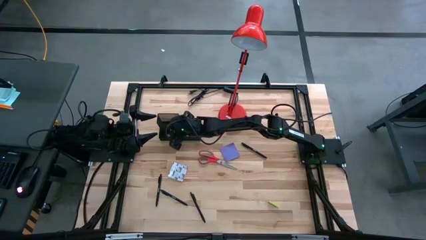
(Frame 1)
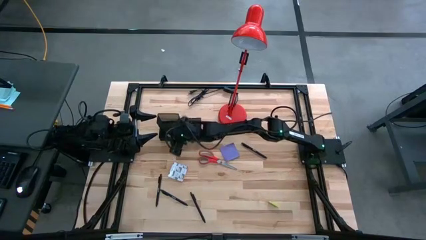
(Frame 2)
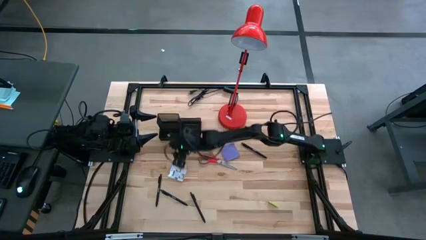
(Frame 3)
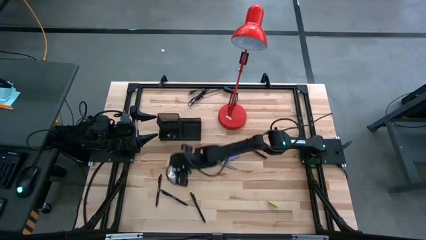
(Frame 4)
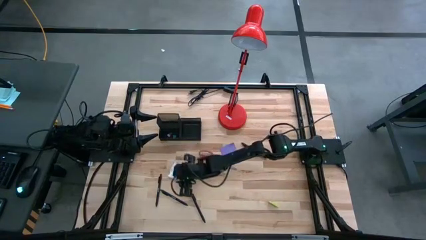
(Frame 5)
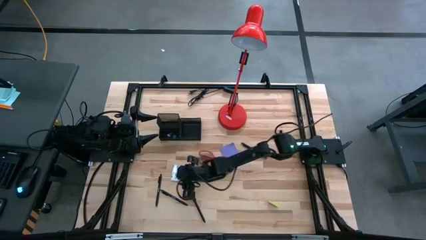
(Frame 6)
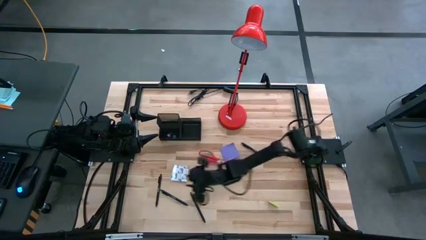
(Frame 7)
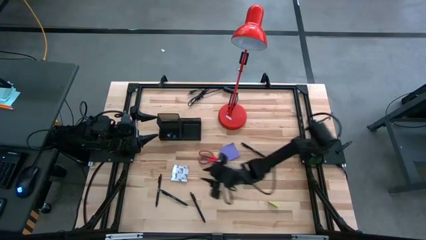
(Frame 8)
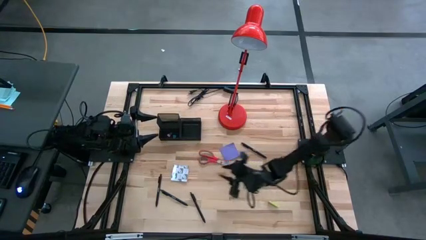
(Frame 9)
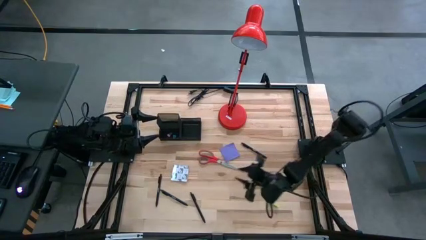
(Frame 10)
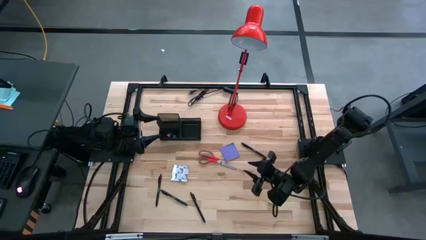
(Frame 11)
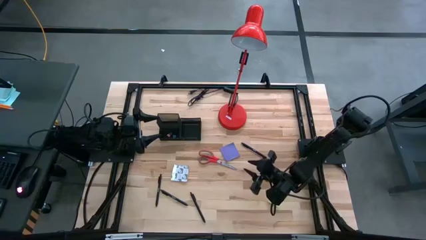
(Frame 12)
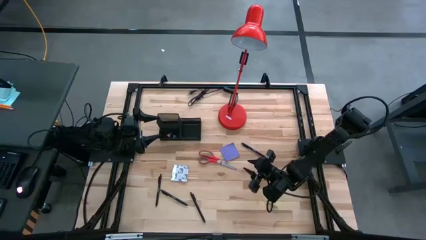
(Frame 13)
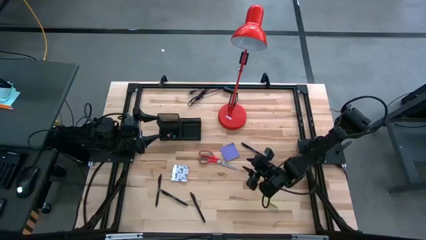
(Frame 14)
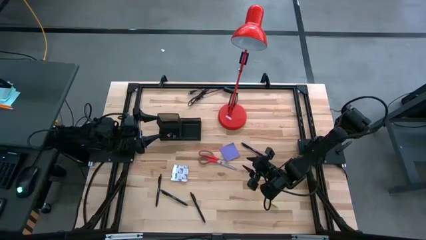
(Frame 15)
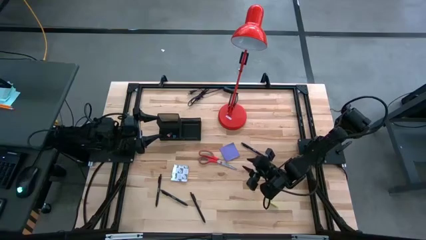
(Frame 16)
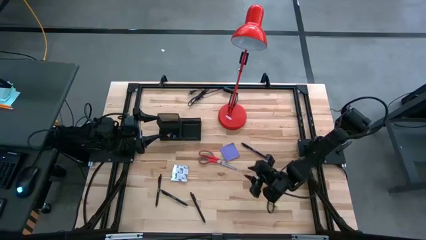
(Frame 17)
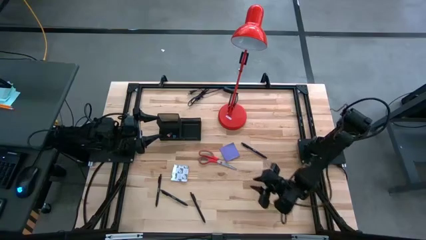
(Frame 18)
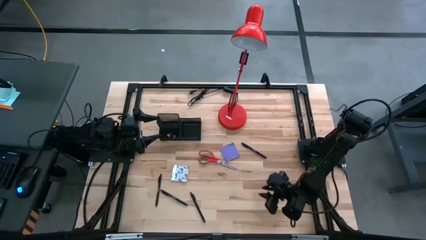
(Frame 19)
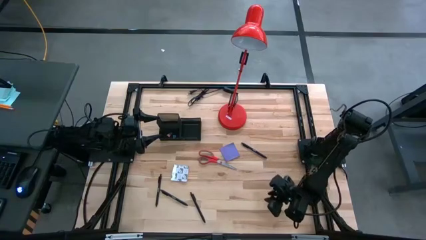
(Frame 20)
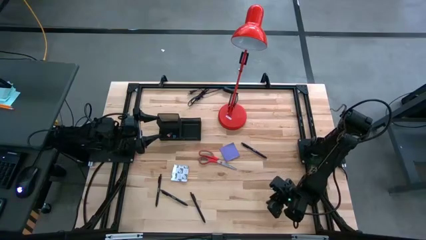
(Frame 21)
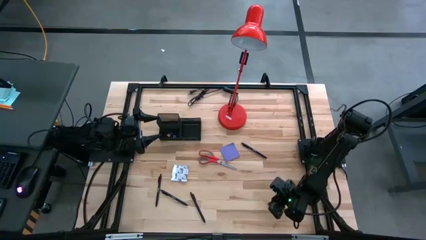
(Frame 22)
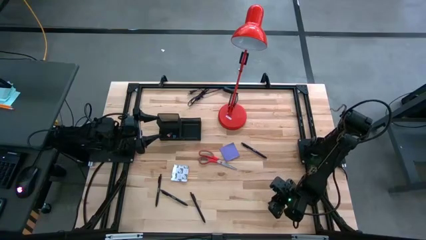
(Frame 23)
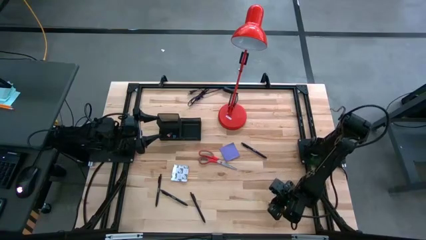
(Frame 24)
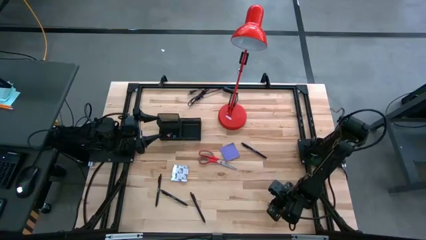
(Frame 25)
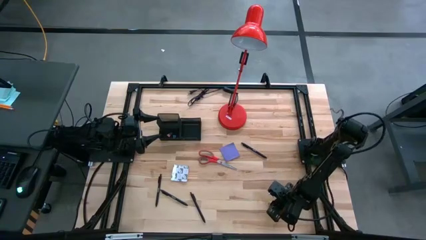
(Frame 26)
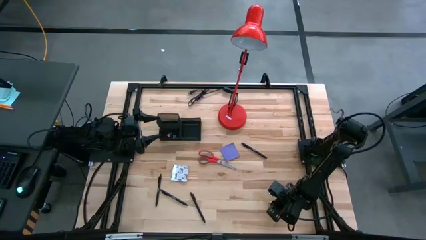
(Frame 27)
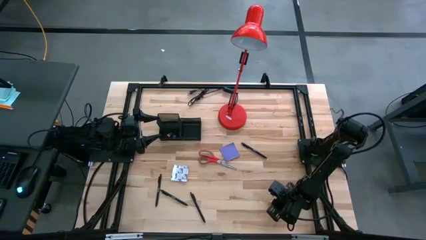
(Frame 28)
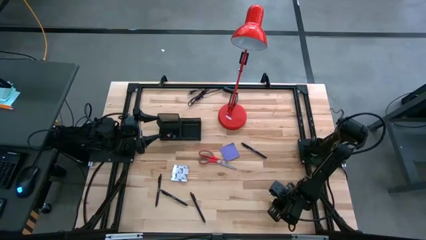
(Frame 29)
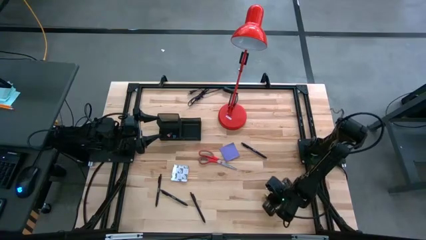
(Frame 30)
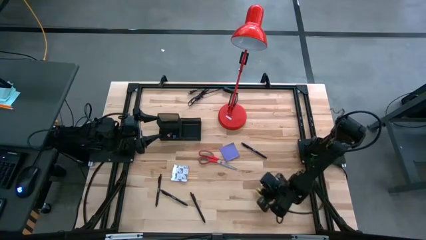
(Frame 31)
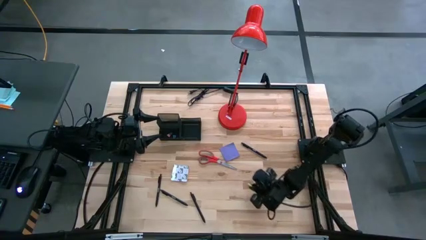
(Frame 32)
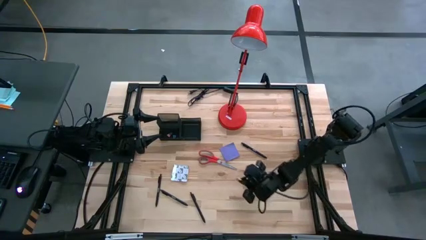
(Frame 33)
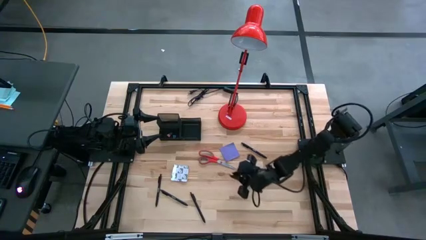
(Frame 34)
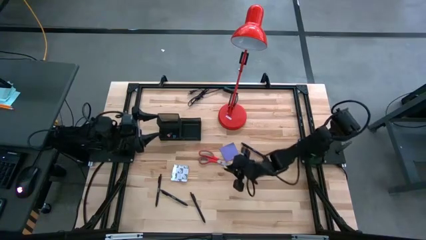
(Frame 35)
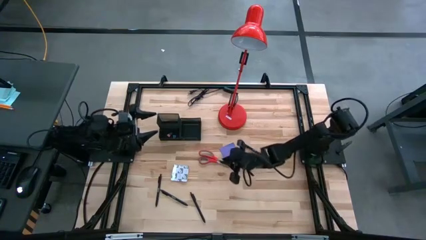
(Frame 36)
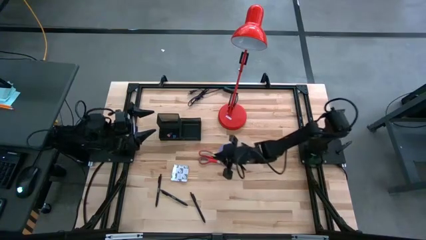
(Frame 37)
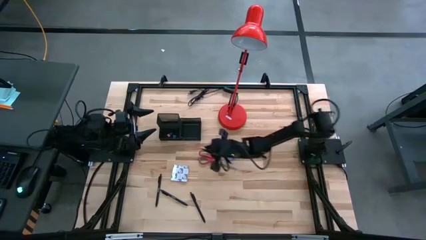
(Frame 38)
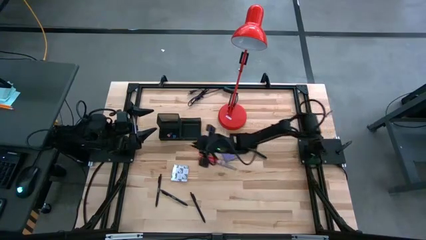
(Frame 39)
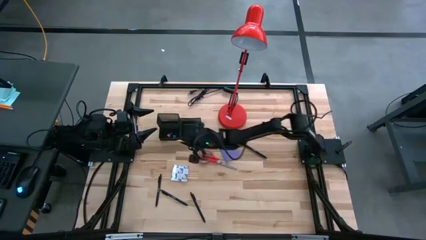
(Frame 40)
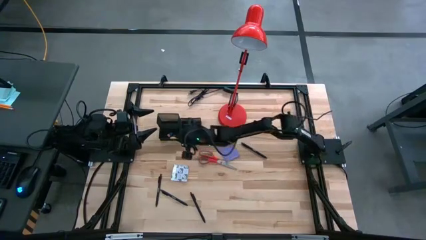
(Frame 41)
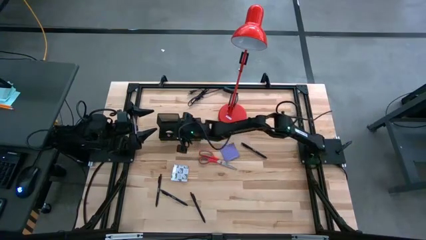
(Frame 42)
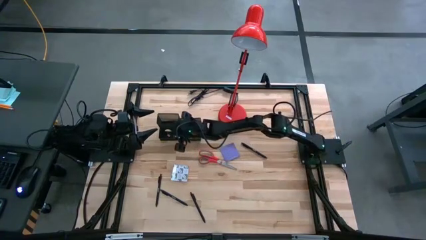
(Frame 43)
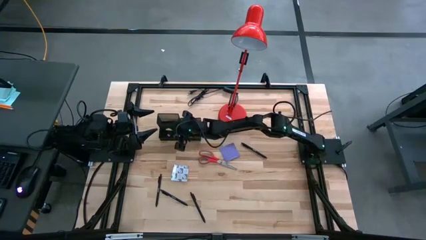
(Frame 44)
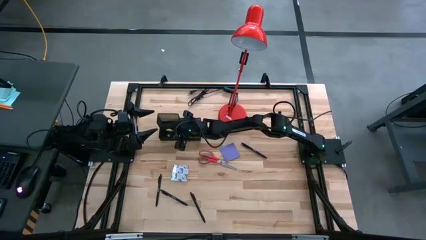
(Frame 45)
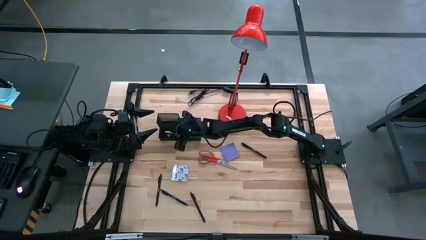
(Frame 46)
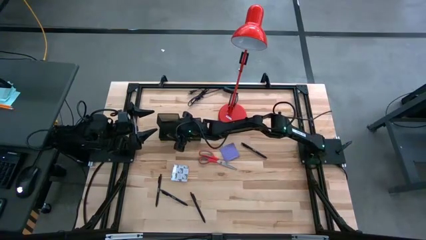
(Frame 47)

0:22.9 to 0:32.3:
Task: Pick and place office supplies into organizer
Put the yellow eraser into the black desk organizer

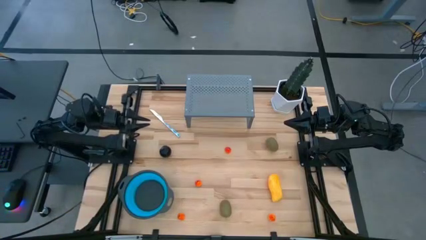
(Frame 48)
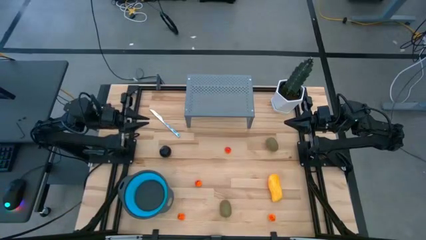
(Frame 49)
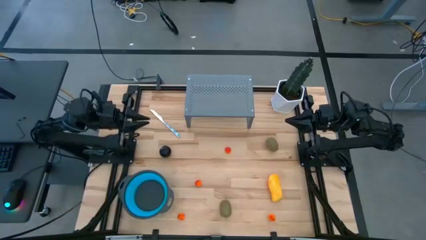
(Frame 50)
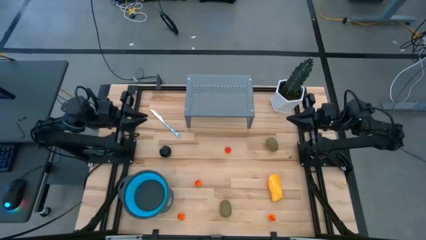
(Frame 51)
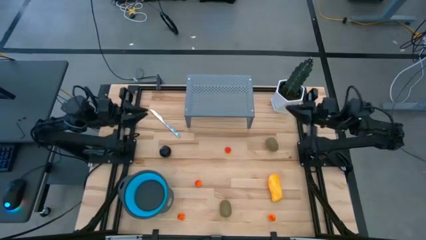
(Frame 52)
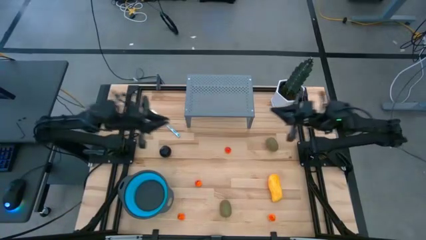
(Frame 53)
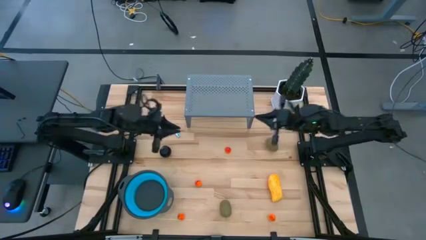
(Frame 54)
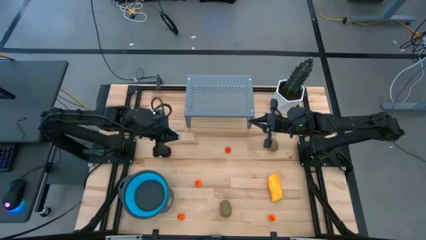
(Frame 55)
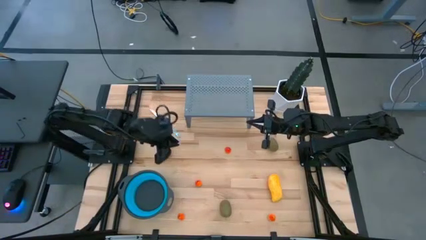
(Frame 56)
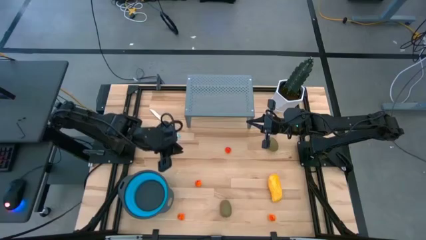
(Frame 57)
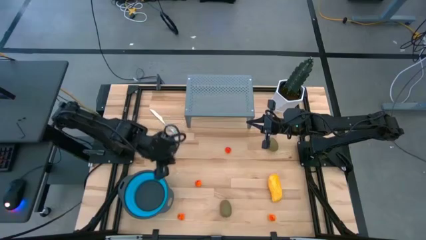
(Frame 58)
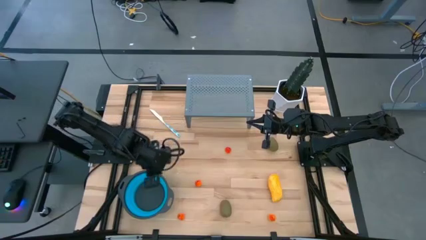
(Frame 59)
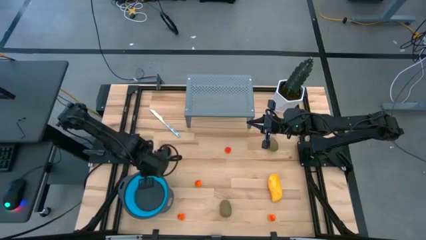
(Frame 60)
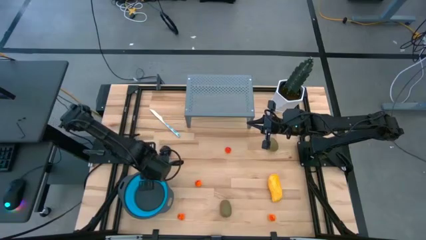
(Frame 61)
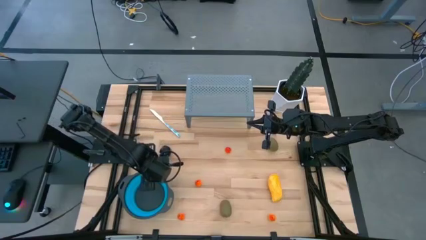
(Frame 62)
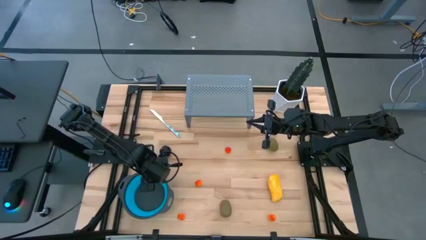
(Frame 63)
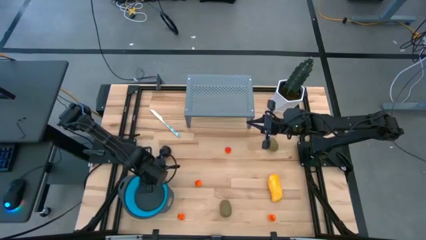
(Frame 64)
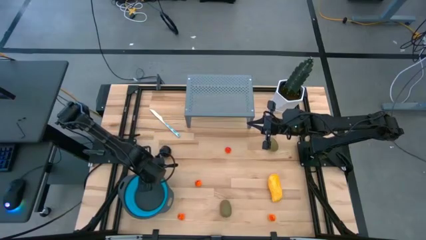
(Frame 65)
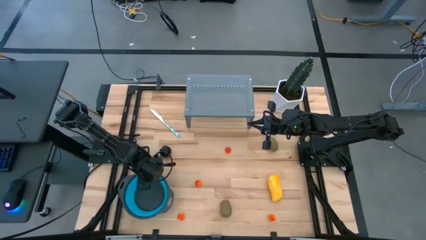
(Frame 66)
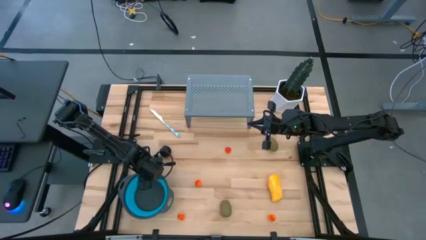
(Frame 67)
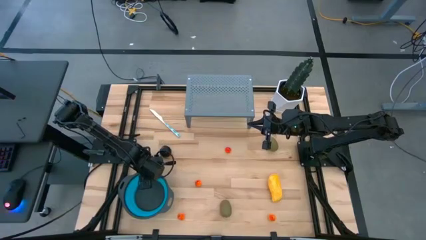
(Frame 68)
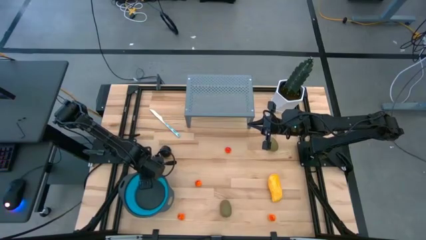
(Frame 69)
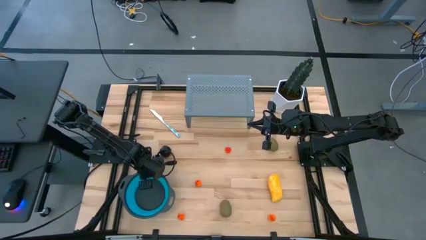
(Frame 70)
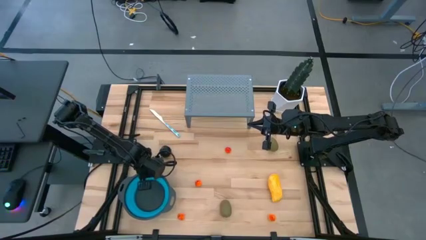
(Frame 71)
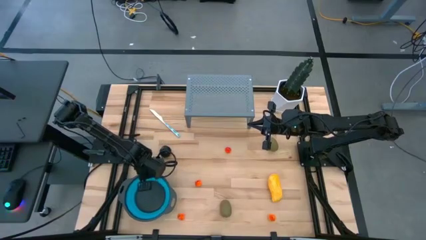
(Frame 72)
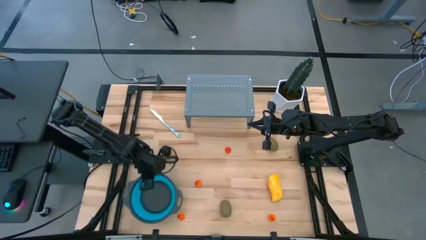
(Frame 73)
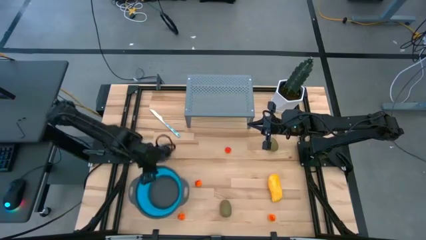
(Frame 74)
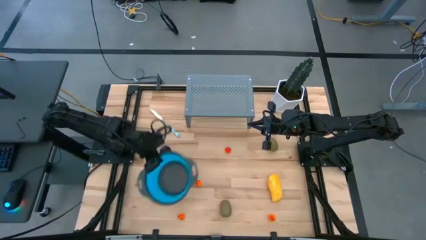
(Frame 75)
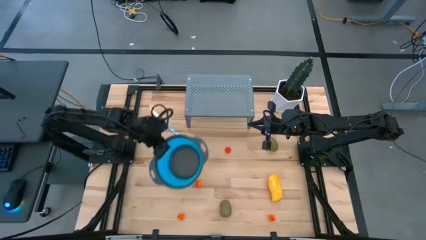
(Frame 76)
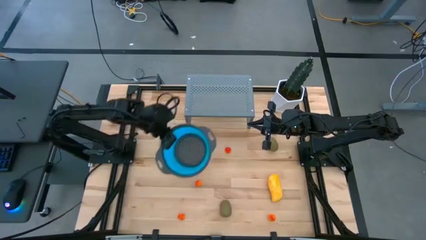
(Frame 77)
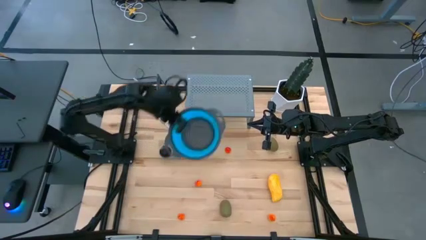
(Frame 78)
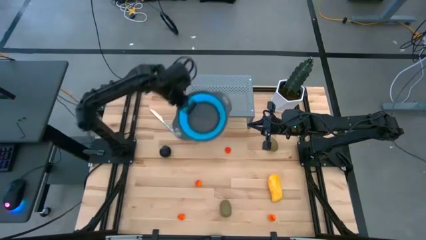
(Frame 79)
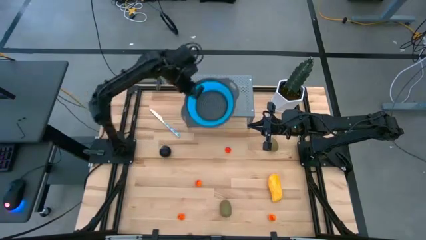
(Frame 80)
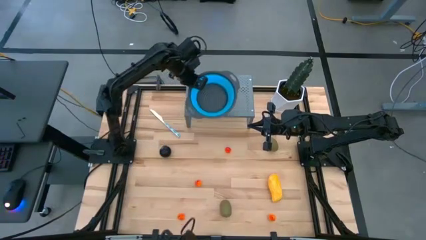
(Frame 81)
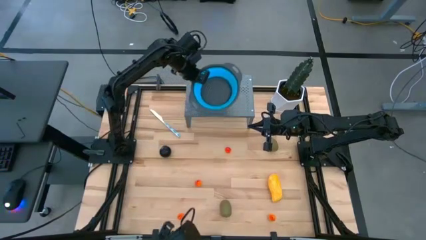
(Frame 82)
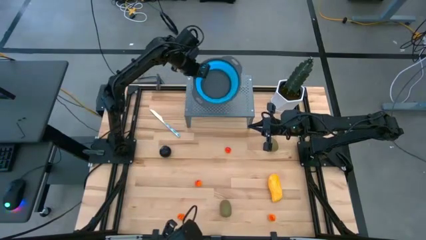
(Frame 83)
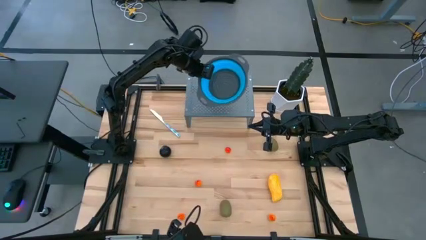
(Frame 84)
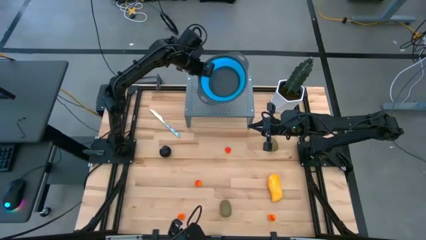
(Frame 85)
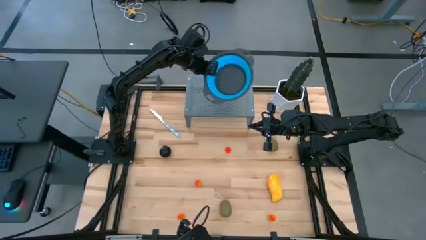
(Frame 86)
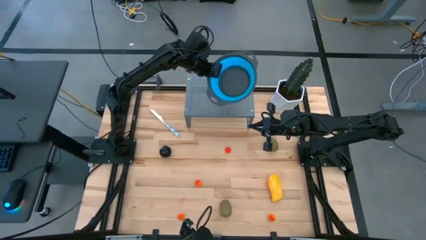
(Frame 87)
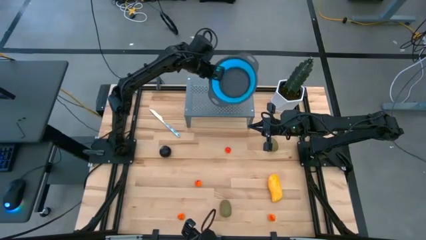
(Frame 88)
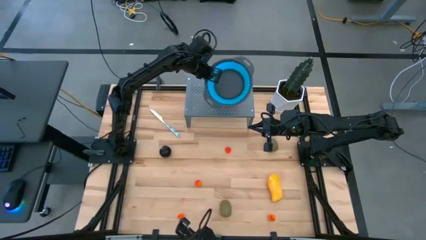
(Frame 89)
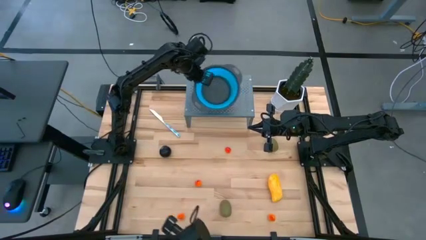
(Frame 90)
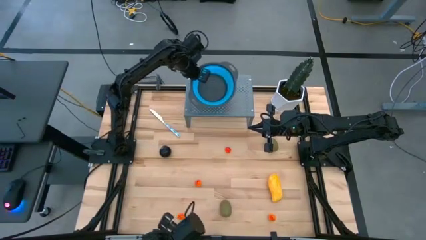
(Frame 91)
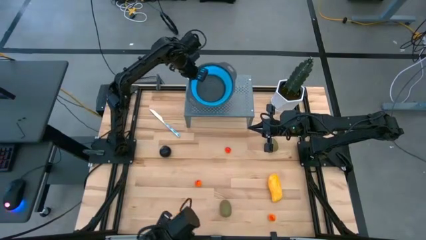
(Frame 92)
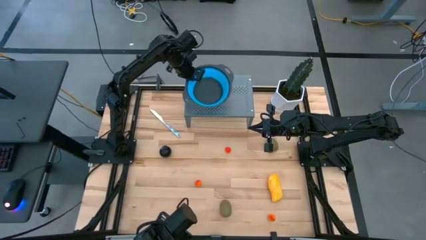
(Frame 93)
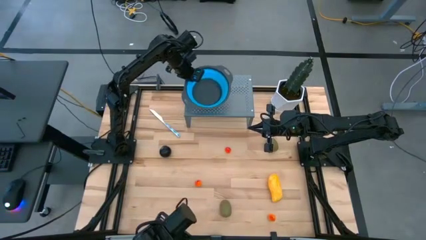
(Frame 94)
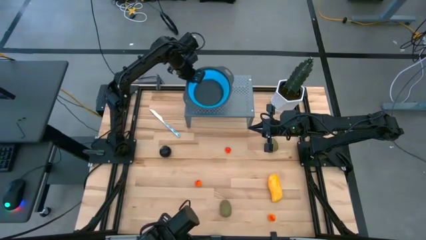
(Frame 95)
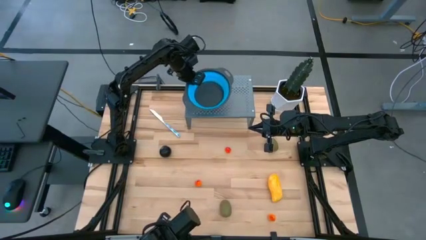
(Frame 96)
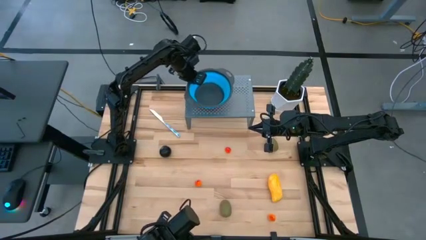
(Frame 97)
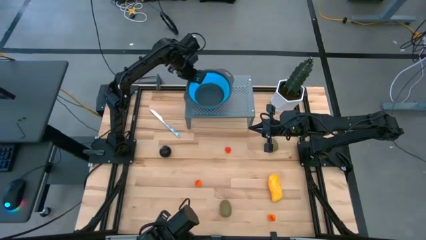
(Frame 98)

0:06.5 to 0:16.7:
Task: Pick & Place Fruit
Put the blue strainer bowl on the shelf
